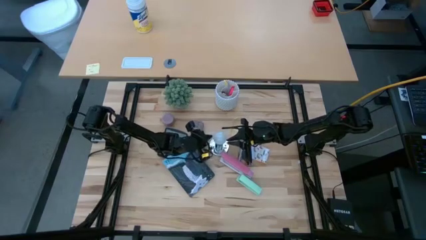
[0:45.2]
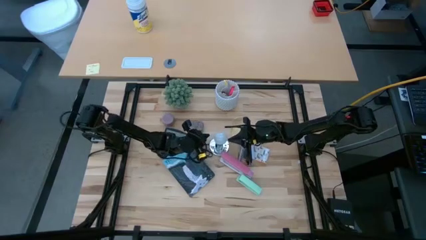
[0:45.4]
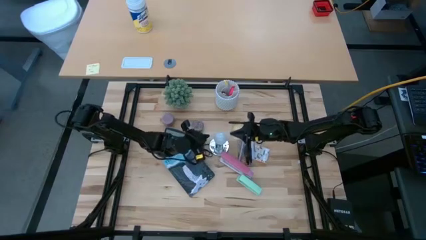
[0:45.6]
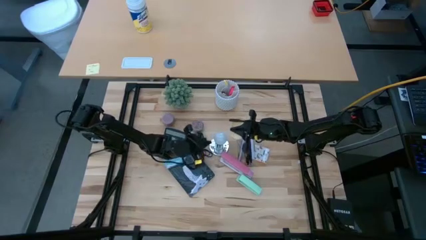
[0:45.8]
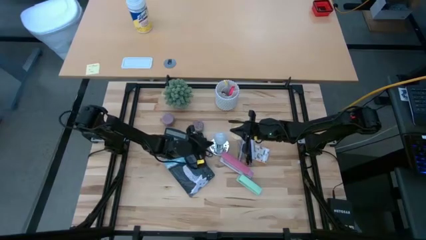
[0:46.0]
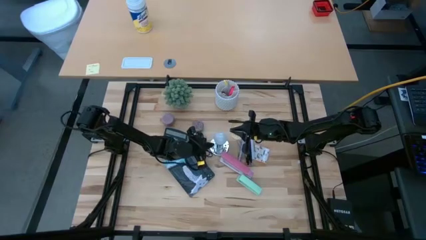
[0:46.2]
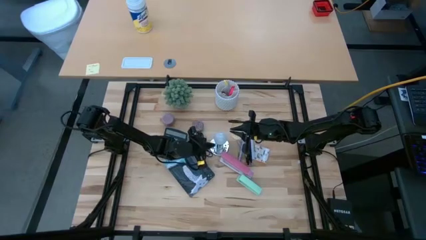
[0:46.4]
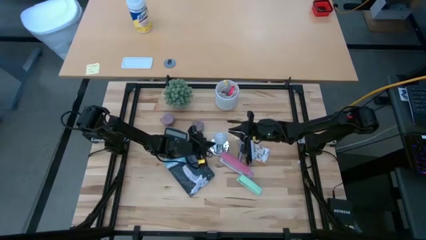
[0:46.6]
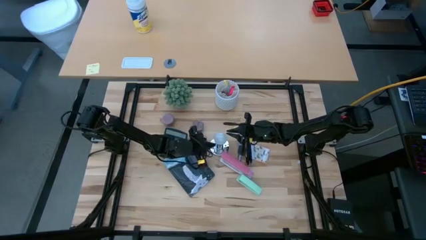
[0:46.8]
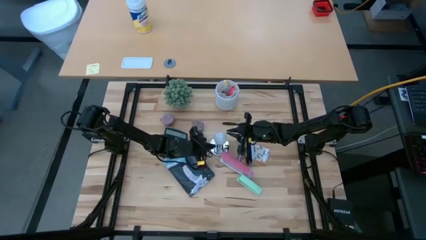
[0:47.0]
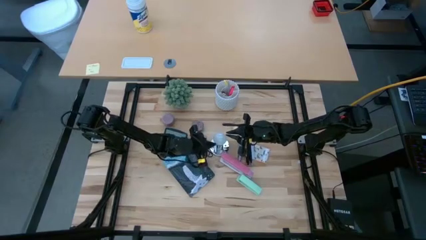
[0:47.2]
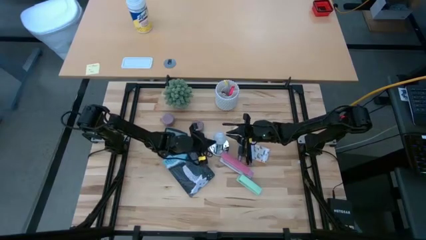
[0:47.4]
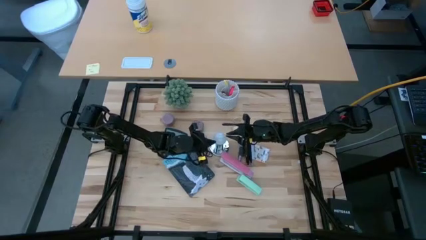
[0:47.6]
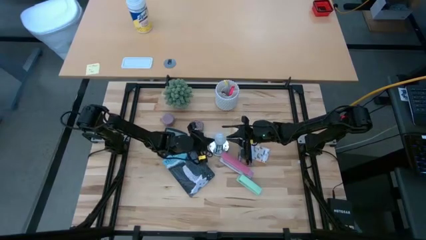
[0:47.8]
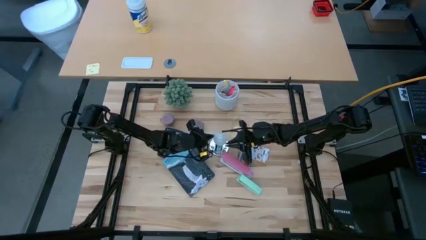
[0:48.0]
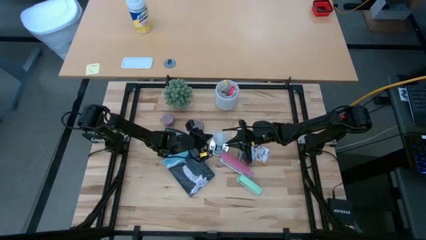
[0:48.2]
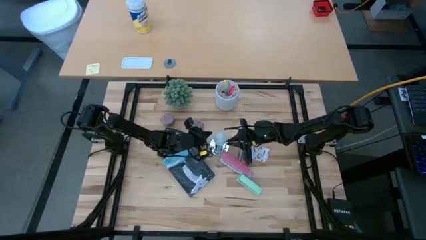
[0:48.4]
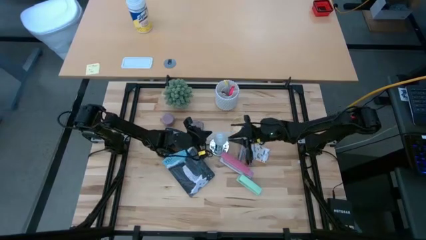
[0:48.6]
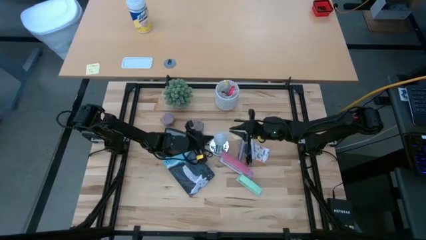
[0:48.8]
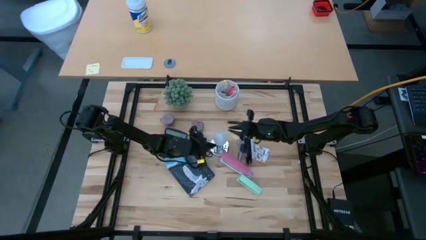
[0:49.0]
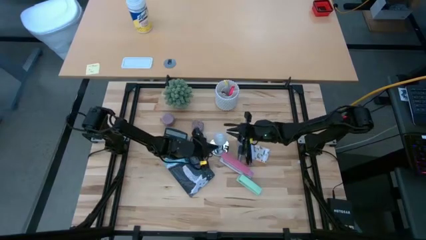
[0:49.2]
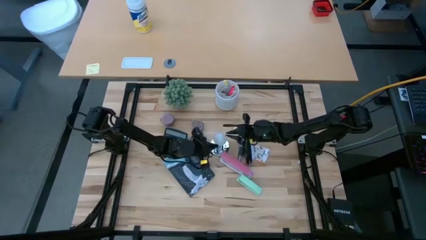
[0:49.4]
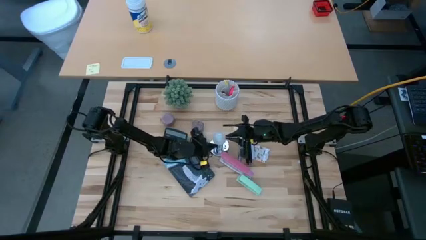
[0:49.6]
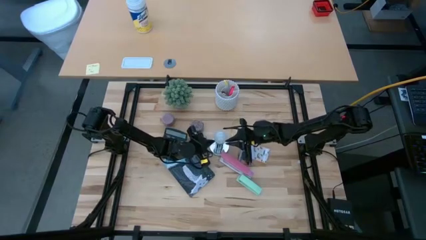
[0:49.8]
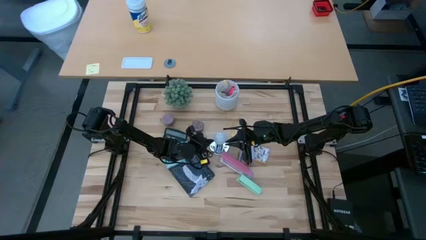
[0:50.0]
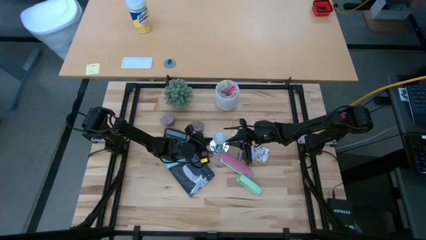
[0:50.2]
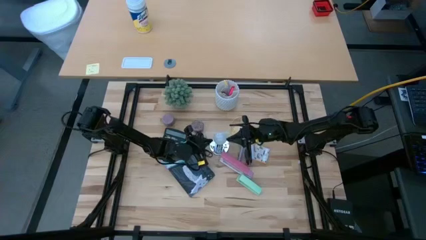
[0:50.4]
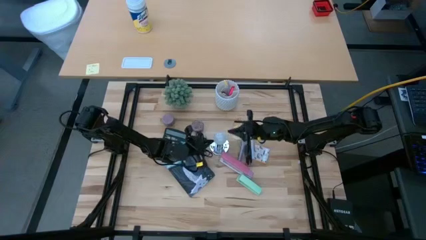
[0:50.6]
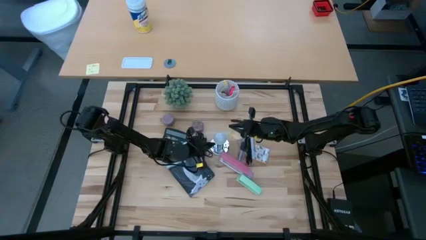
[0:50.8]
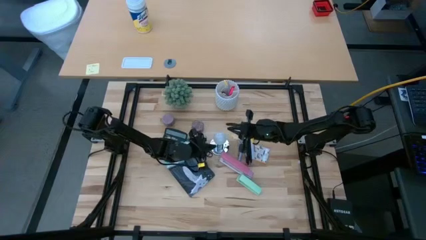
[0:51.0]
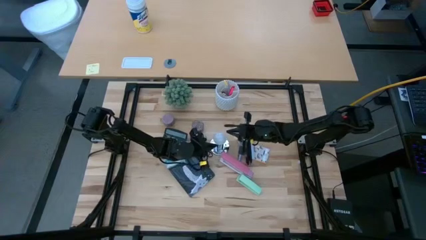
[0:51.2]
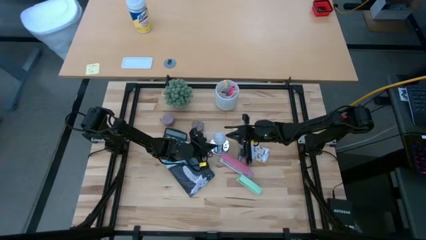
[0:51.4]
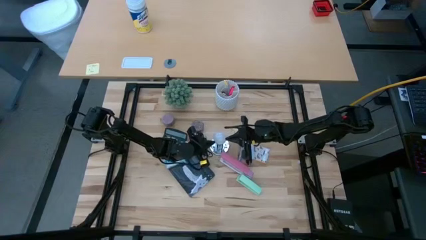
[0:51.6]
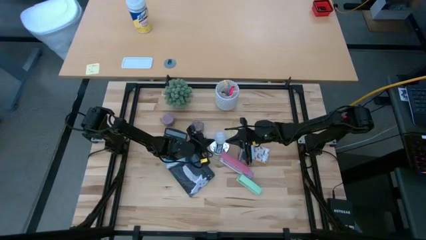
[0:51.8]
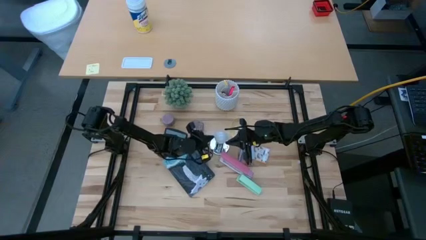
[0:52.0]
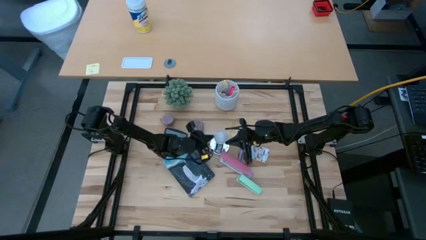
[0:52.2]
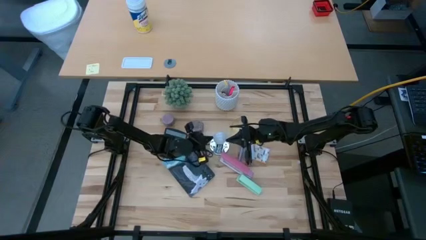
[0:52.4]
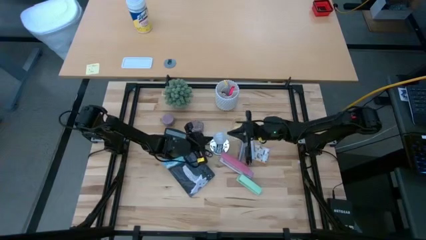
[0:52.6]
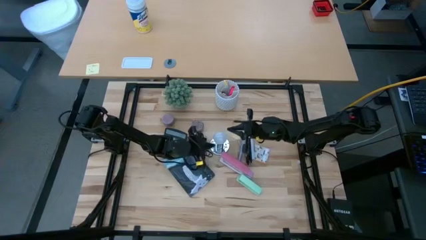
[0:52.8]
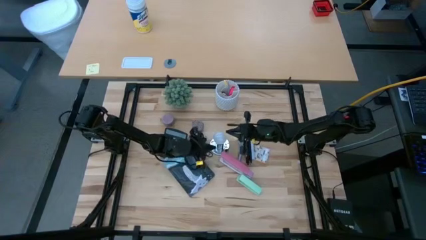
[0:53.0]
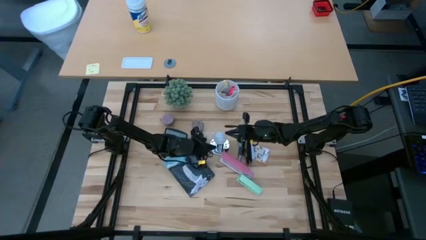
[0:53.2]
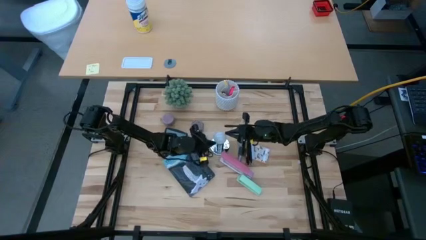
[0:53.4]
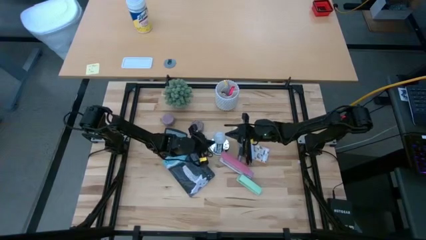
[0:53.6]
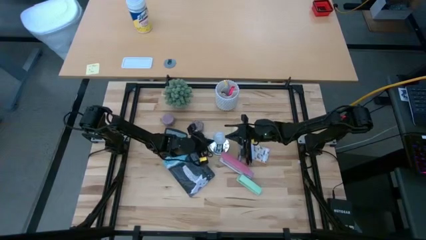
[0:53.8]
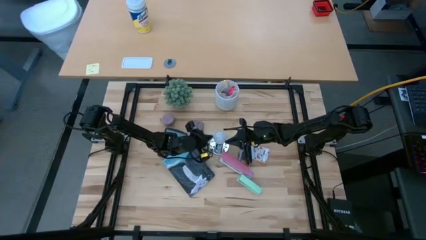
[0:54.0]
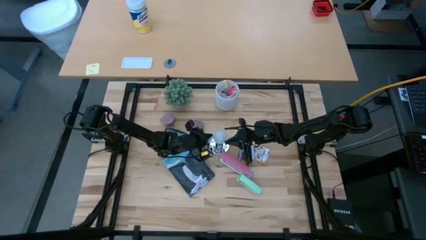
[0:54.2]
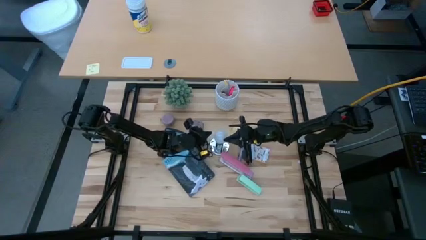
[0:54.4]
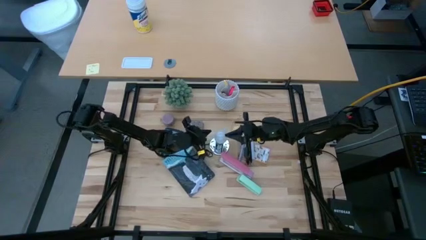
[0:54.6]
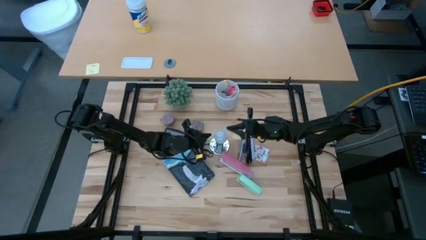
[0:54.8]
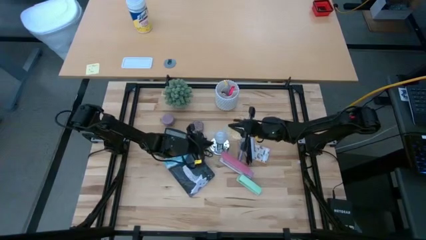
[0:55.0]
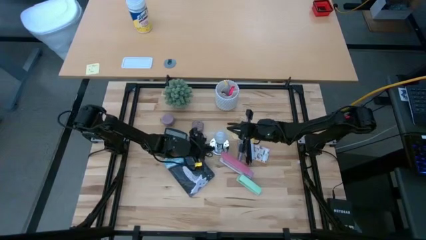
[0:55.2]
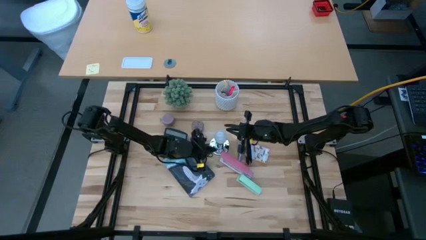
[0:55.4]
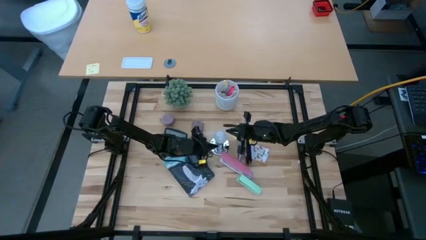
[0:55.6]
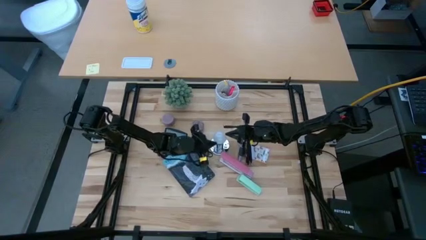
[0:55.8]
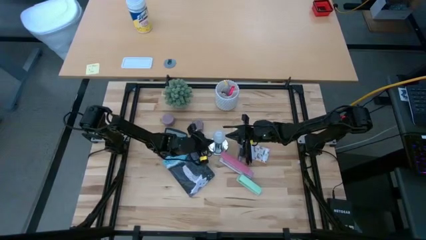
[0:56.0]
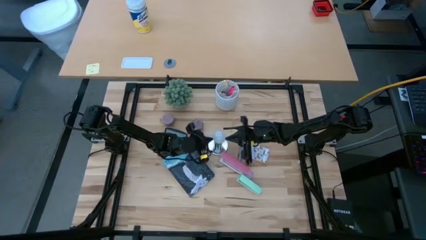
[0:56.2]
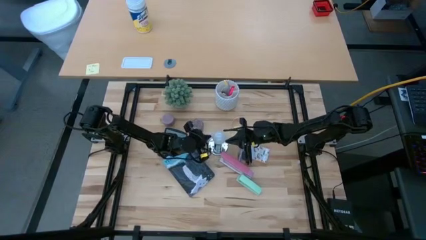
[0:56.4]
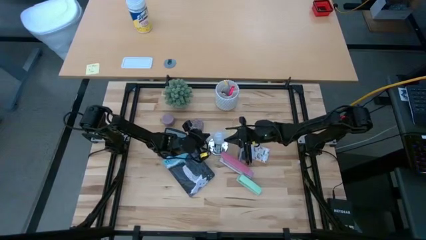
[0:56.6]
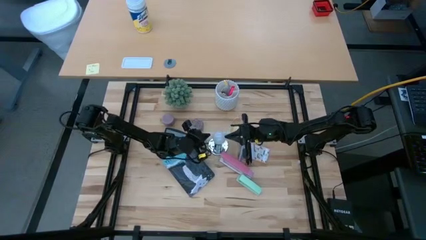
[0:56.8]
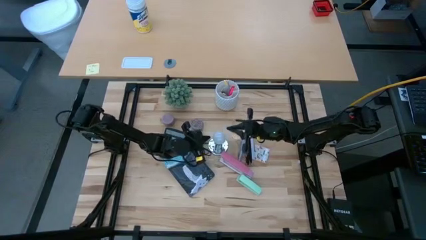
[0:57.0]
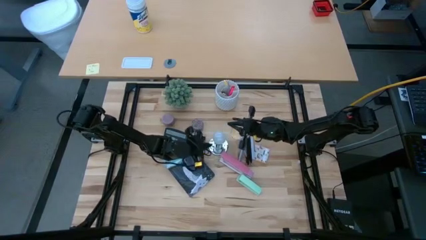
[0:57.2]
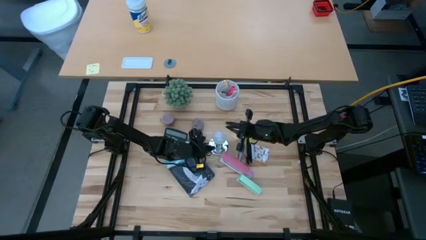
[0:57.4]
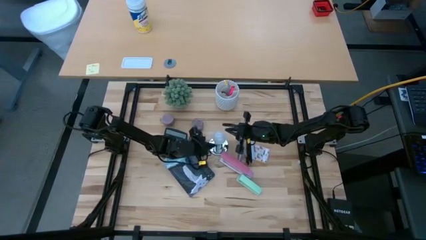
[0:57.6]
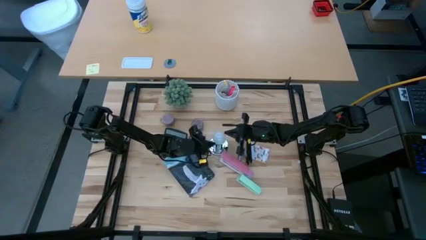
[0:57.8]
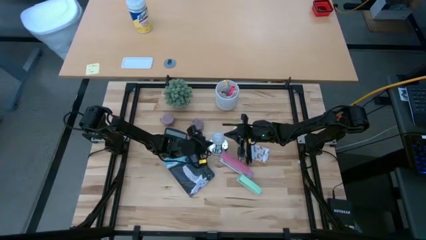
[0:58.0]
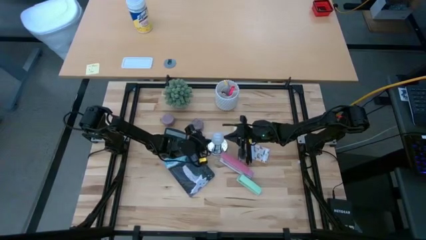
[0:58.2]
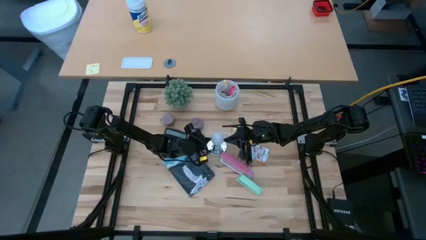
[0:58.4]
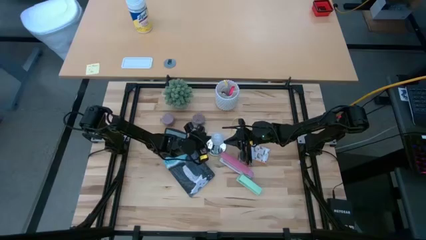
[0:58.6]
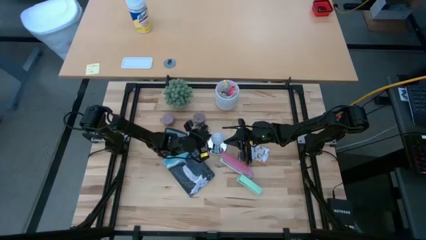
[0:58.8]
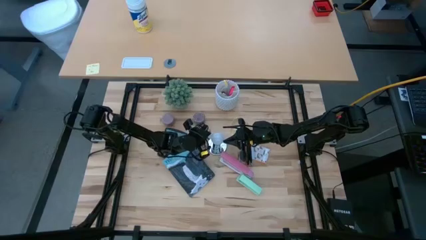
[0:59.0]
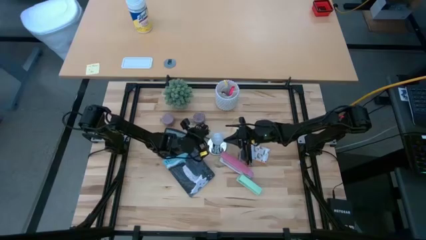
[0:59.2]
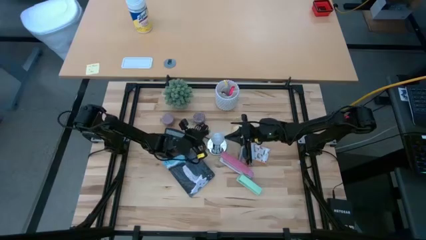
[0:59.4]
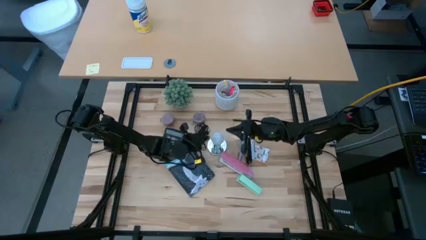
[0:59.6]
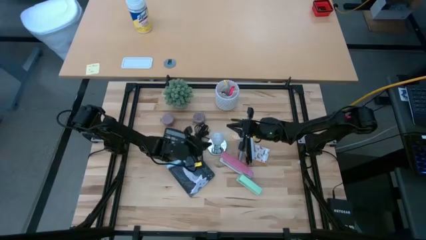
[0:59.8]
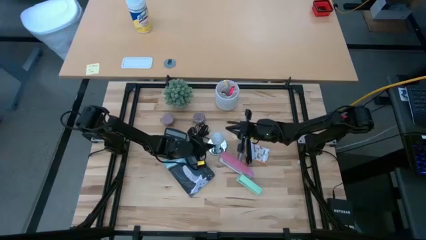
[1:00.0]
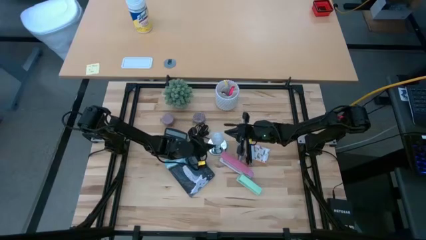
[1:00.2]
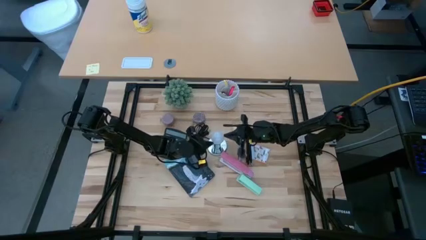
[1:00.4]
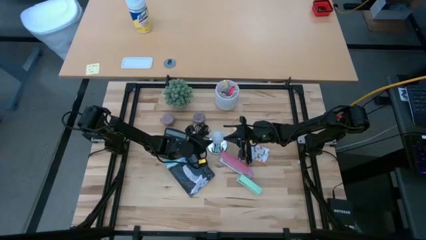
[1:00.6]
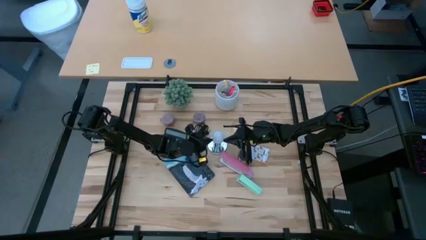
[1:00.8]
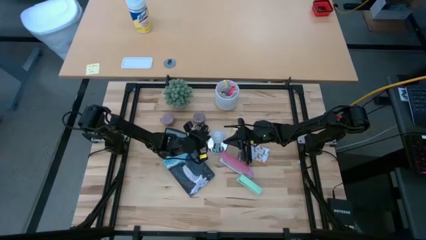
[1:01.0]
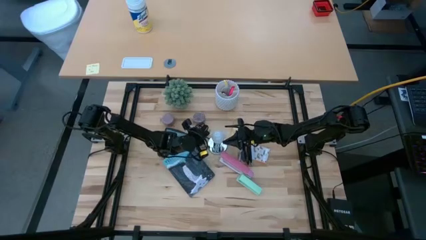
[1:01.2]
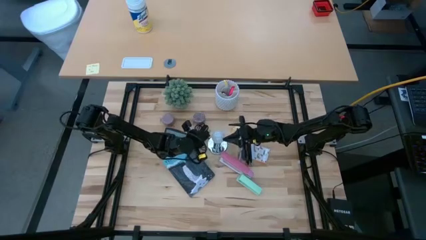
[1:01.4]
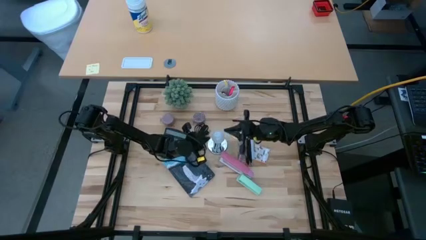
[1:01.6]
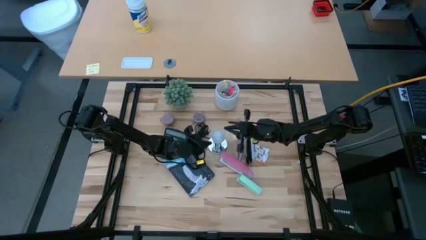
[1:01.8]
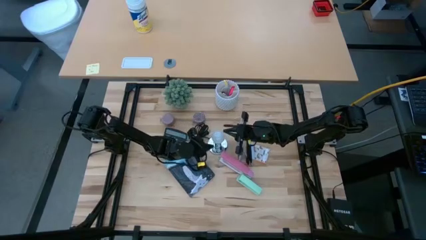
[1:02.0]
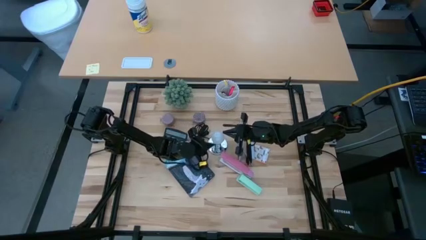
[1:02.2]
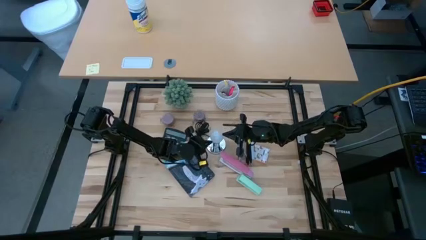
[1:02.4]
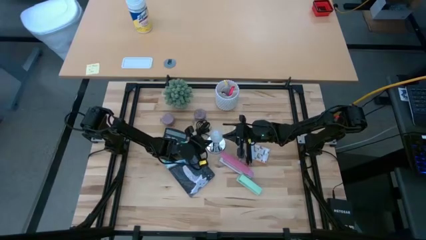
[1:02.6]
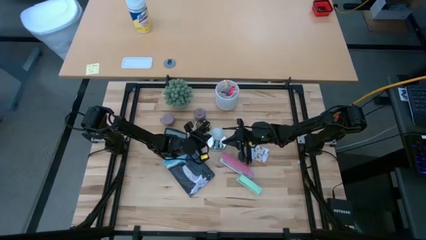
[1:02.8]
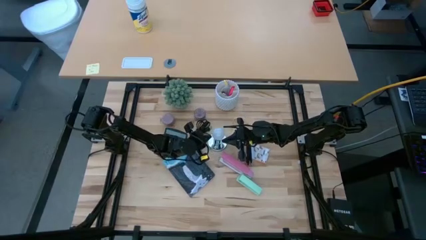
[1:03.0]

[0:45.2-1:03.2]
Task: Screw lightbulb
Insert the white lightbulb into the silver lamp
